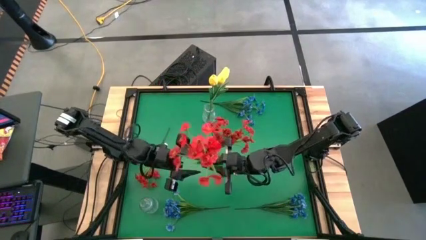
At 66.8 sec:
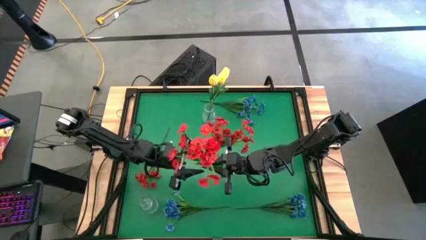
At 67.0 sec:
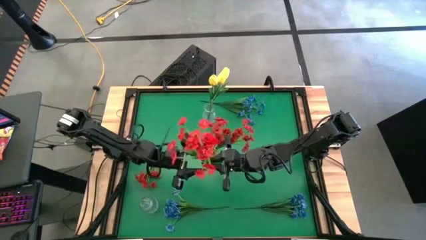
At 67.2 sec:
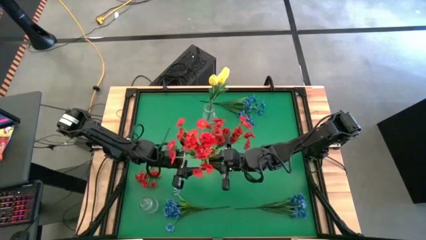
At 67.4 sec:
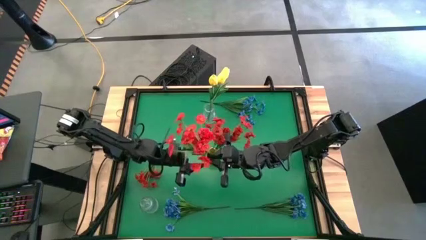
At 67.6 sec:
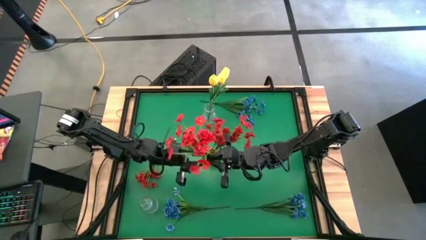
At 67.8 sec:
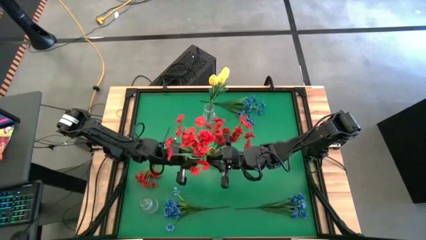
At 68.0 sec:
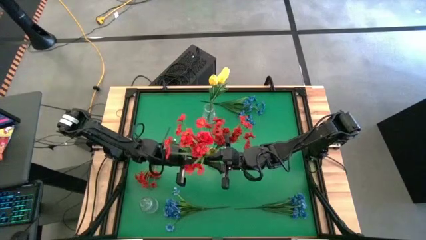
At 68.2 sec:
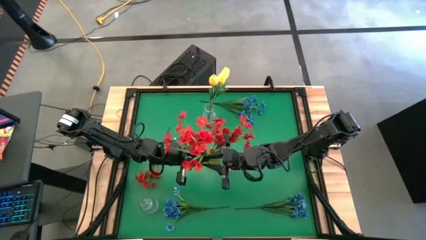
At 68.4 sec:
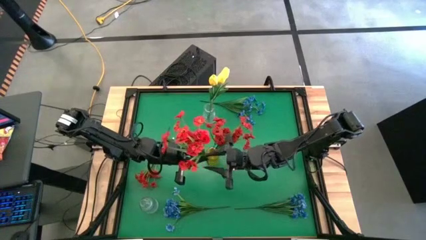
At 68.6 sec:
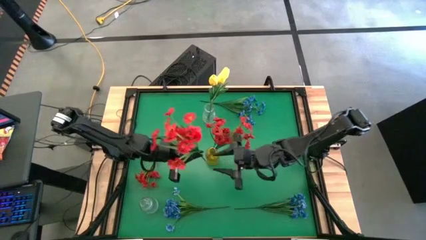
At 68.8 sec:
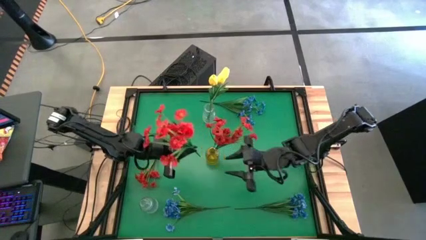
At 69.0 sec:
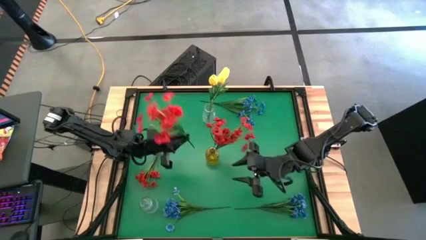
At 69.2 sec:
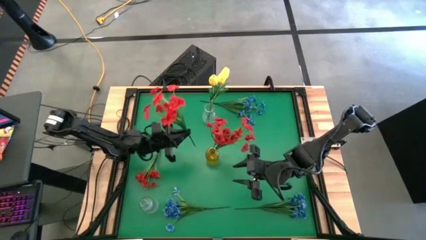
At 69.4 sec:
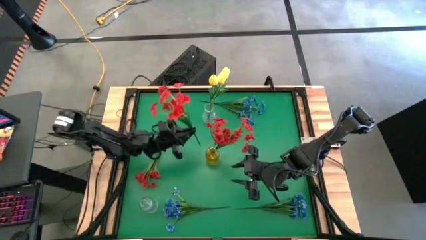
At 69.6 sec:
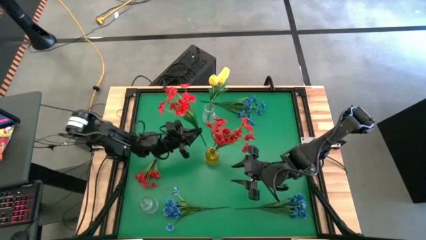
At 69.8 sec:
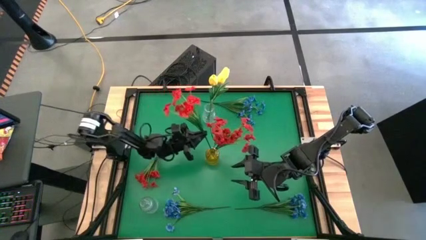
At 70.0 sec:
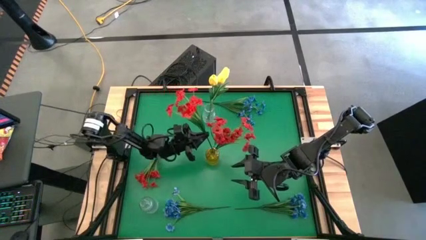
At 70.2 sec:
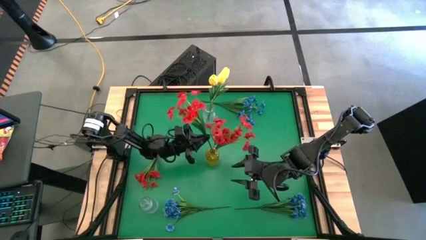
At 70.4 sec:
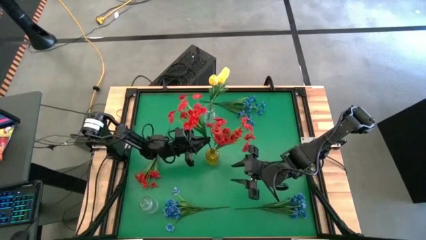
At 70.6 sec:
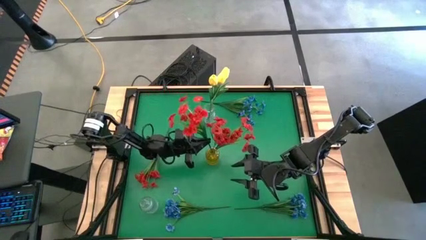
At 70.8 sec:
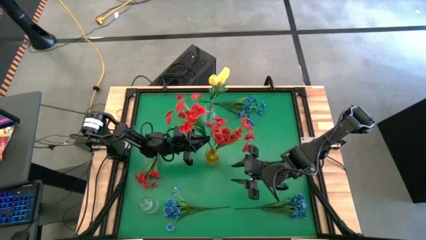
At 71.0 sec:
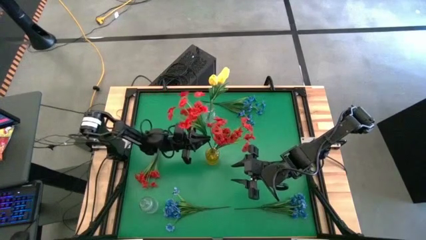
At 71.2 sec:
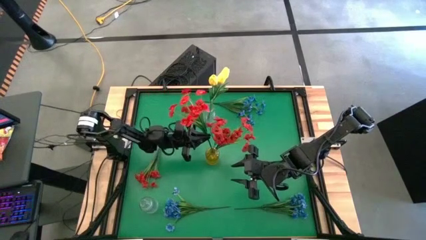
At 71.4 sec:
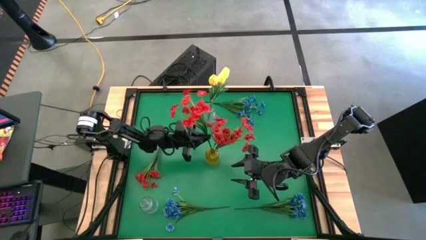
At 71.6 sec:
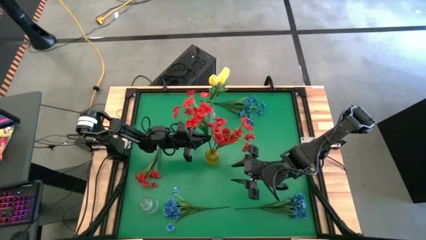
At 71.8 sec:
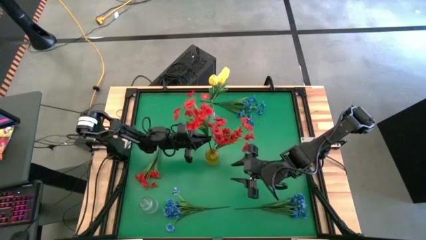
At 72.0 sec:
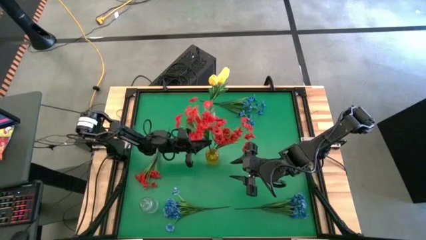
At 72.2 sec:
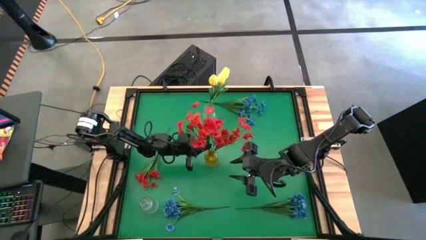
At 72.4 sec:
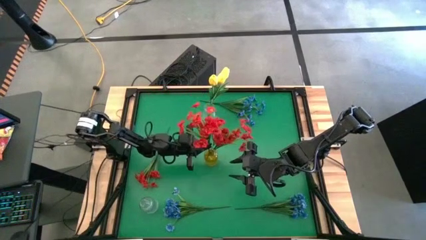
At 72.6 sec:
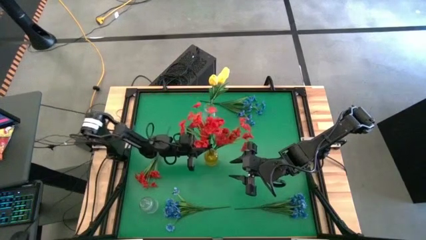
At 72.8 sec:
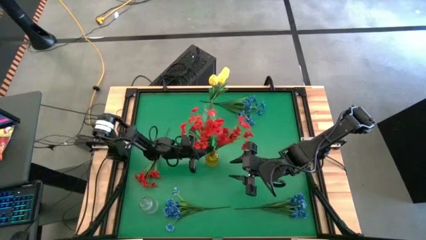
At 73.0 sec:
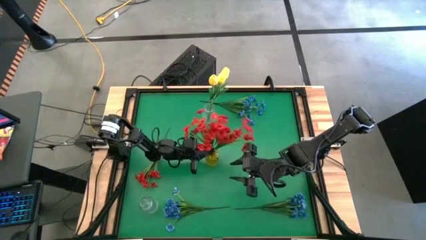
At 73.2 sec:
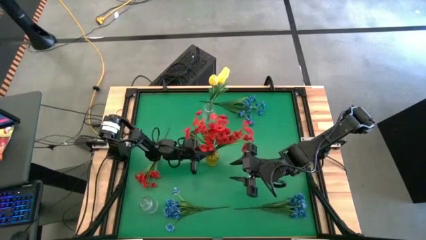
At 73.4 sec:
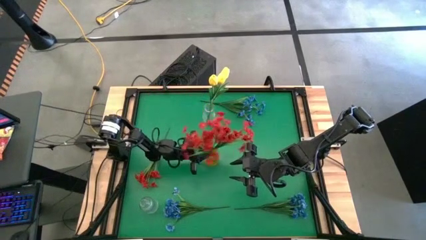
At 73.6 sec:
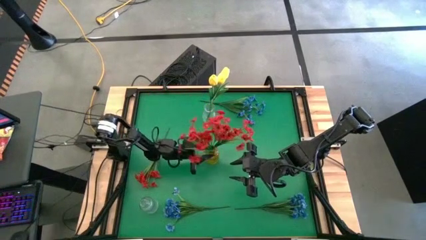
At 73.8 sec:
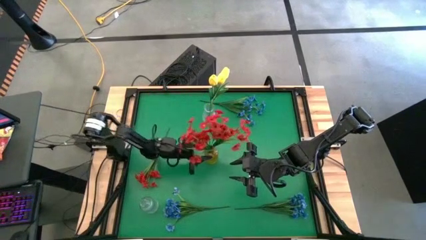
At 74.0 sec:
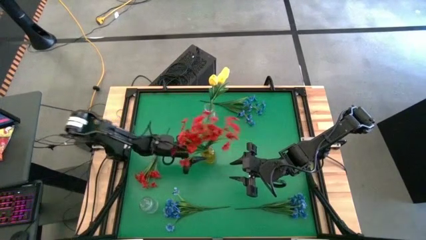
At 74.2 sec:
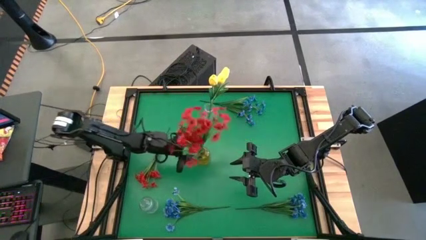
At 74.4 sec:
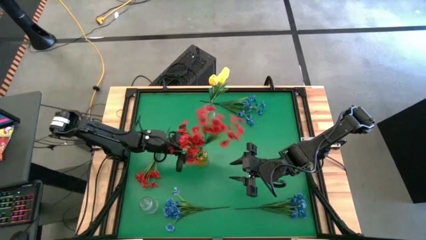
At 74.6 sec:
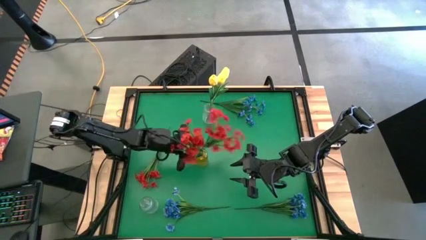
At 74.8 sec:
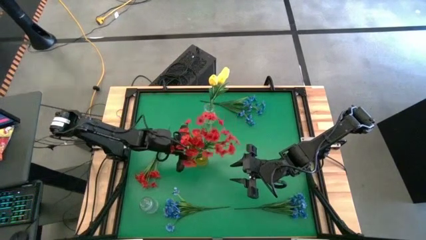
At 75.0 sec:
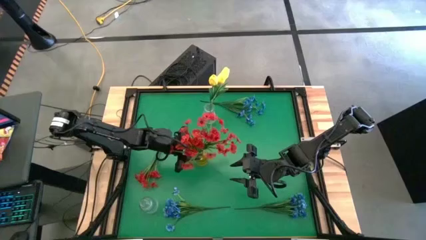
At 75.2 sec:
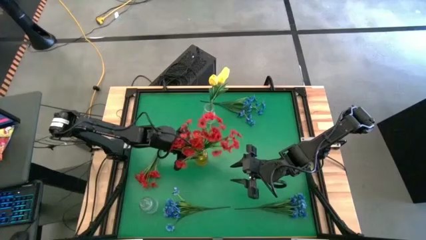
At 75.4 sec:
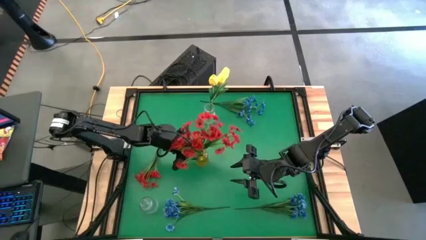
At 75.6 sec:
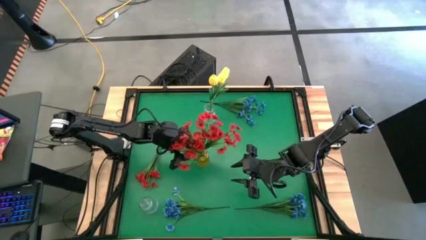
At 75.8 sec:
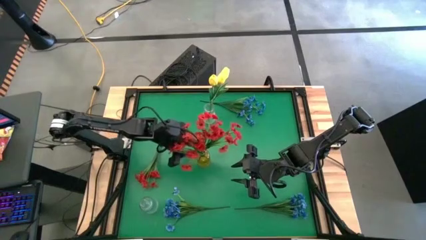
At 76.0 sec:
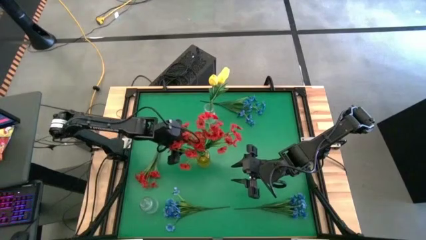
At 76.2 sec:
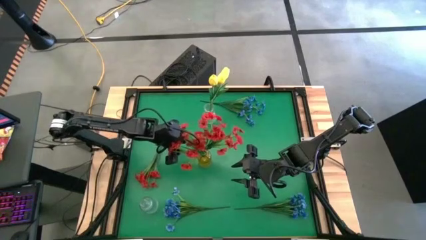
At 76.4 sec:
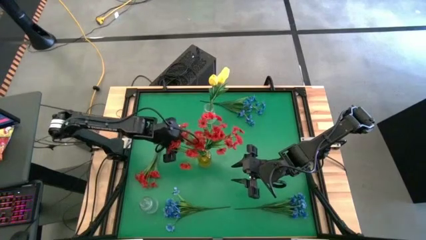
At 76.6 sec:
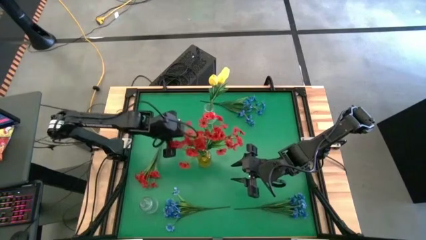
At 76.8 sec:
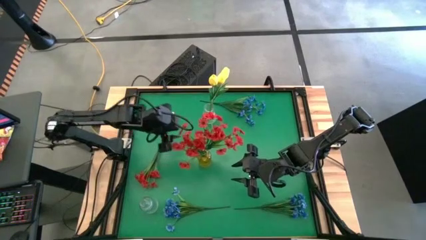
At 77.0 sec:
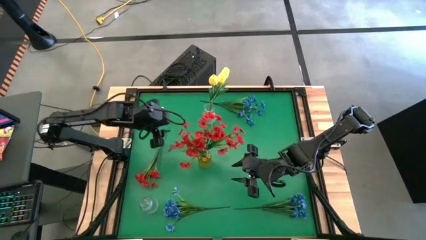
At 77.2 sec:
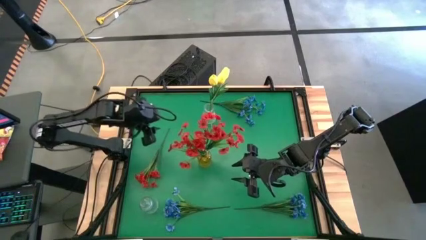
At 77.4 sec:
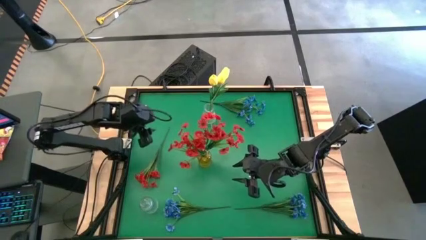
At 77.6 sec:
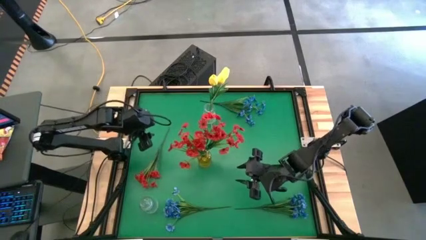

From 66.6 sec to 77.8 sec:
Task: Sort flowers into vase by color
Put the bottom red flowers into the yellow vase
